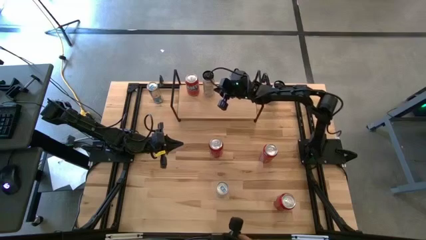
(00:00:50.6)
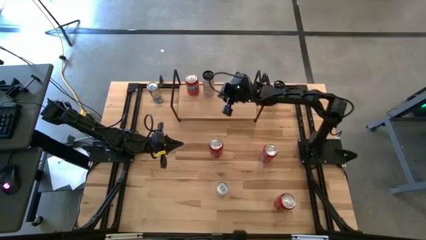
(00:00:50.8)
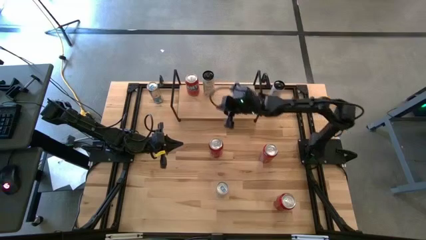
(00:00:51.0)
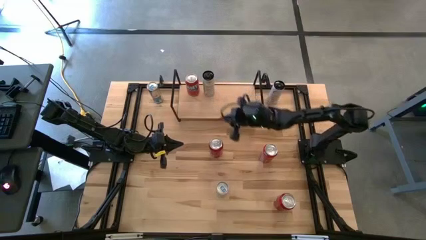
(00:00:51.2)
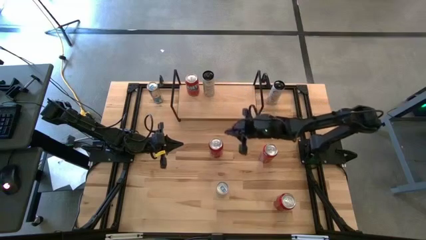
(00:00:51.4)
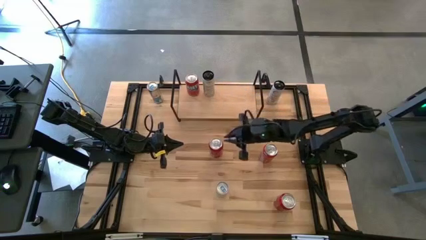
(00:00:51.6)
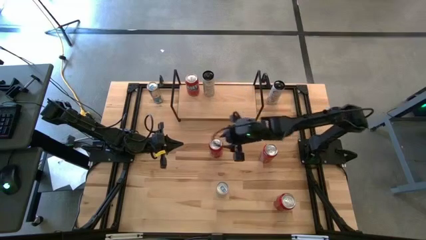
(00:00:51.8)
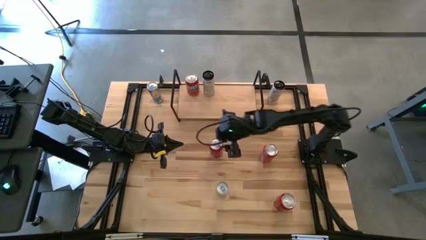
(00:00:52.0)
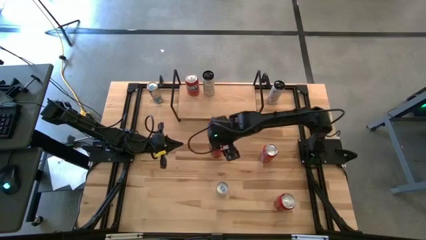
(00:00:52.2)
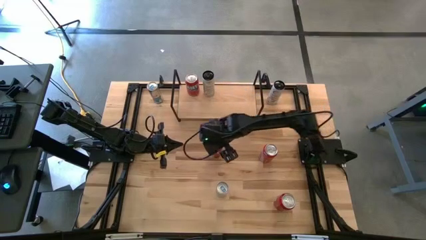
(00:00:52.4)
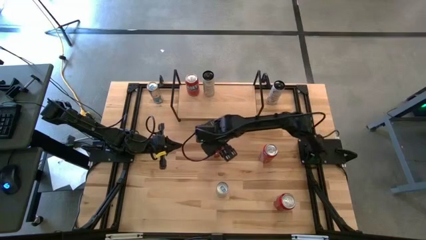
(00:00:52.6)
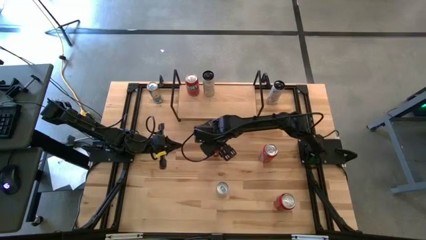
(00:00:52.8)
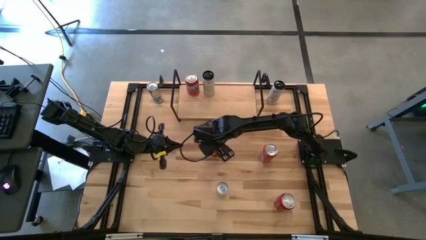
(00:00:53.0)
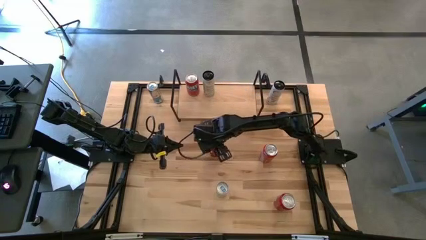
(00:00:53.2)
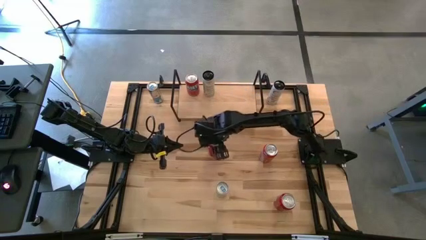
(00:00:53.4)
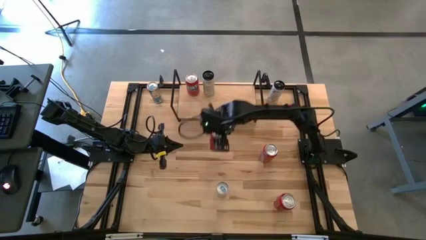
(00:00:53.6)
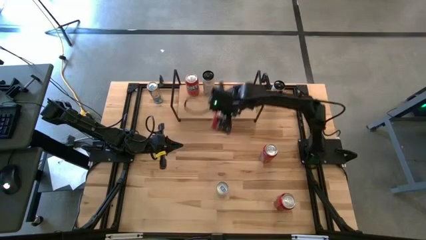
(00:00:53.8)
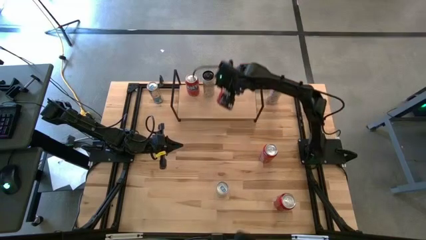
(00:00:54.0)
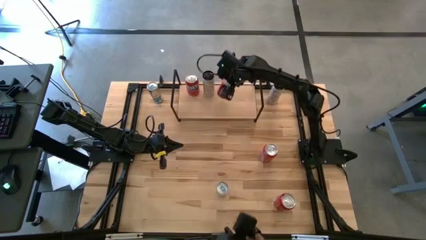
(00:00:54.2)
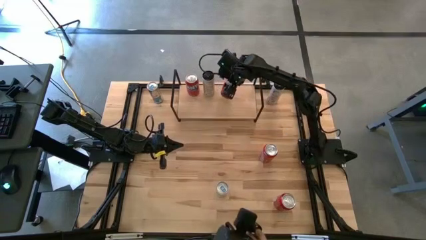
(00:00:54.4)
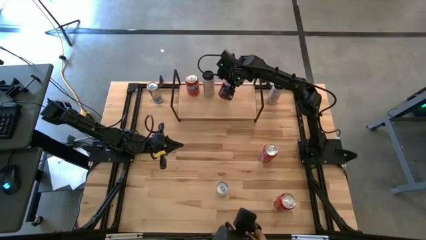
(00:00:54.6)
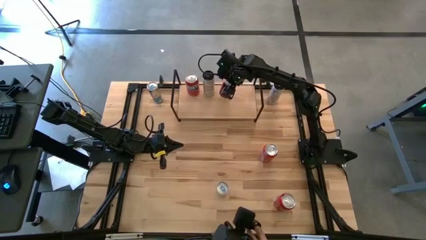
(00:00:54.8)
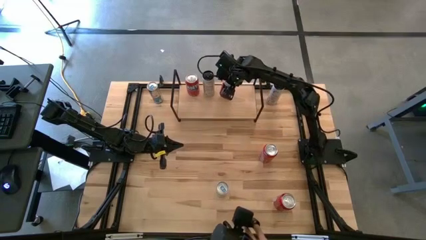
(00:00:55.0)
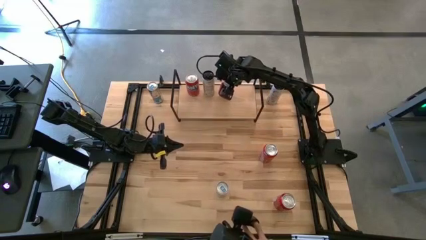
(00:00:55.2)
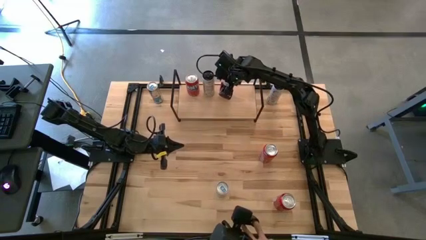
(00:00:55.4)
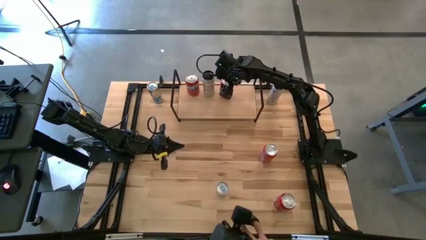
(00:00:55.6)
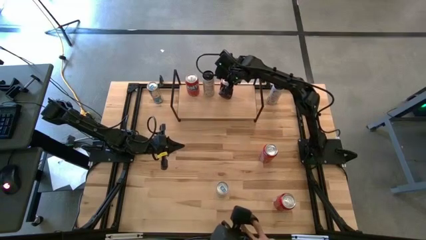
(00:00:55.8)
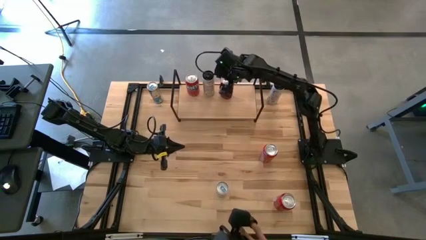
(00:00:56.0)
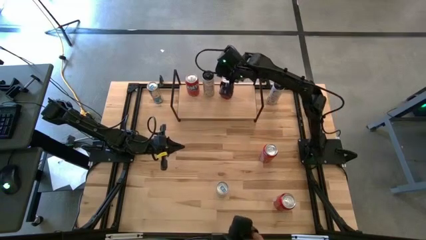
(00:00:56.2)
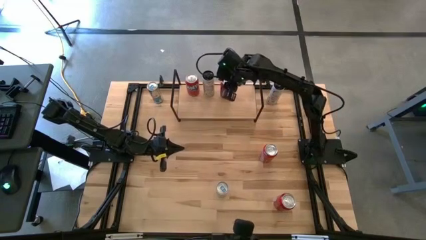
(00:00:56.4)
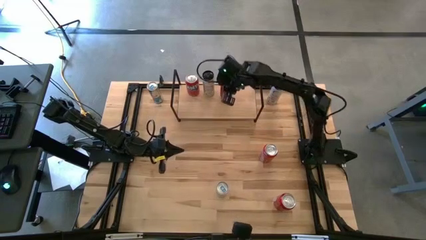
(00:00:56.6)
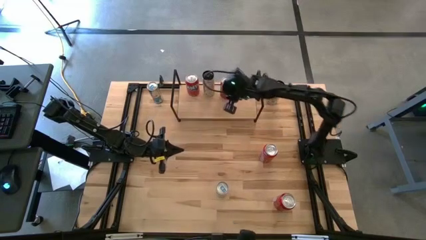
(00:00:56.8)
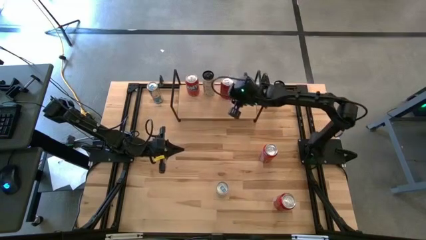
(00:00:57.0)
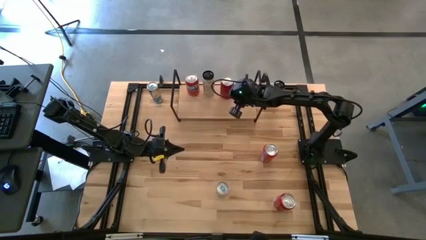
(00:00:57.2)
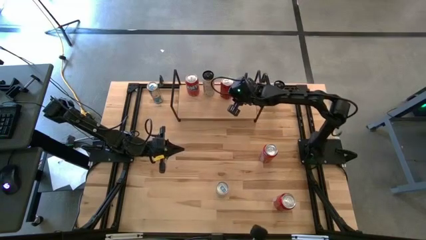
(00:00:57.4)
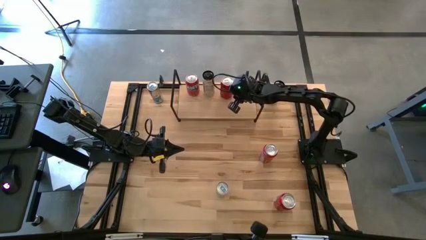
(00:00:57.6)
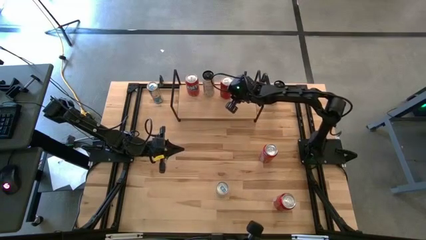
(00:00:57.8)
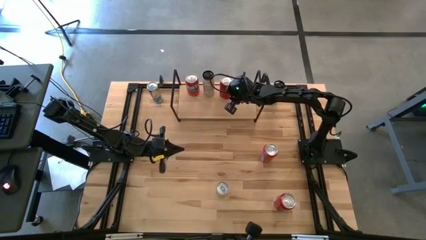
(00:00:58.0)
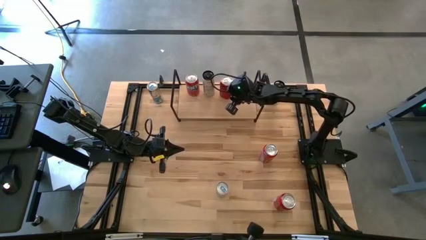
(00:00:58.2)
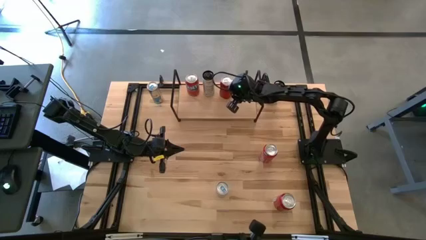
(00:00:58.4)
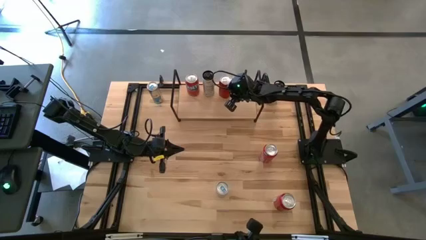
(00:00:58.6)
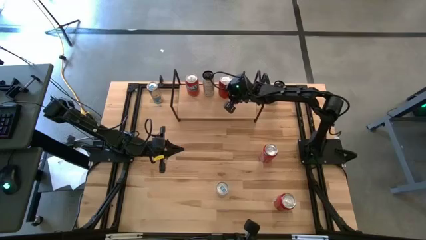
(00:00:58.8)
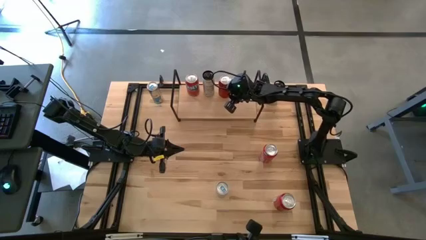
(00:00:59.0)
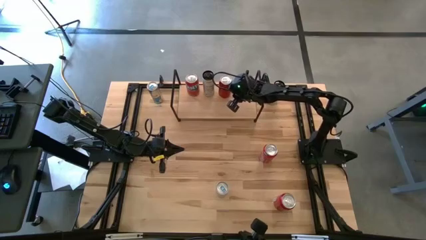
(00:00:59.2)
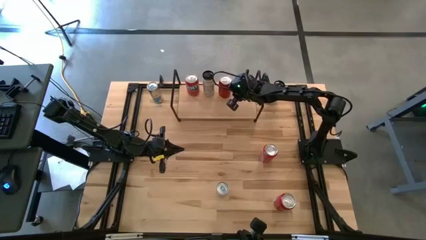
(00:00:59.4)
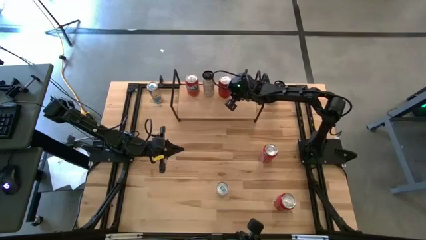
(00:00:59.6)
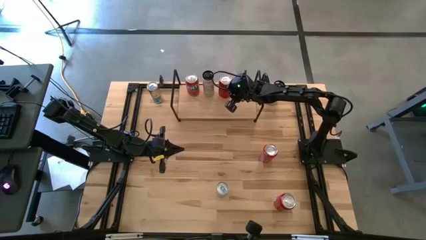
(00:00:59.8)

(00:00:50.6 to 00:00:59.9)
Task: Place canned beverage on shelf
Put the top red black soda can on the shelf

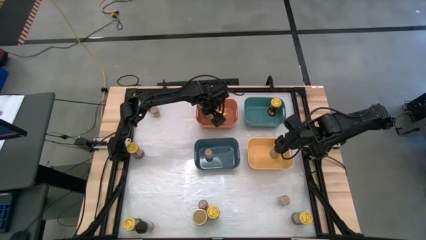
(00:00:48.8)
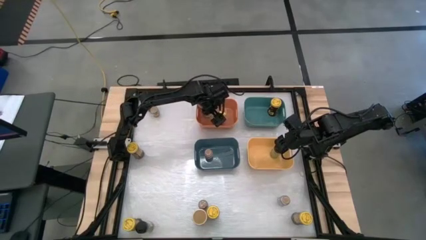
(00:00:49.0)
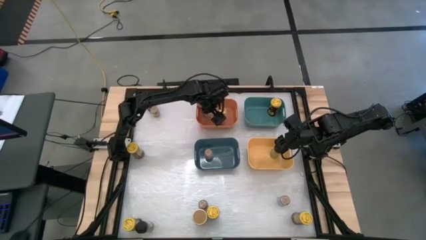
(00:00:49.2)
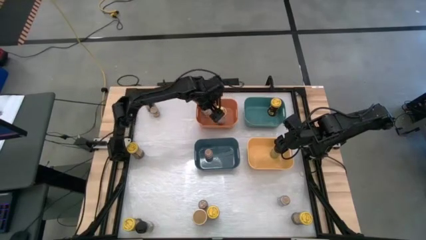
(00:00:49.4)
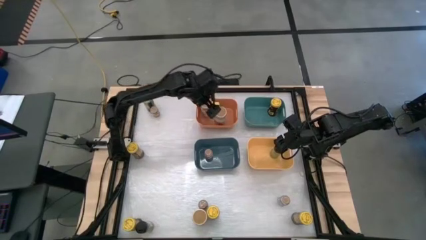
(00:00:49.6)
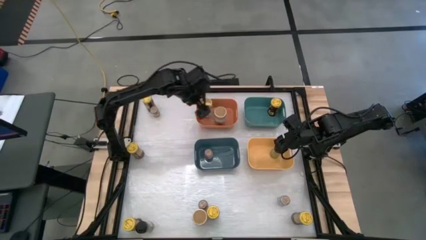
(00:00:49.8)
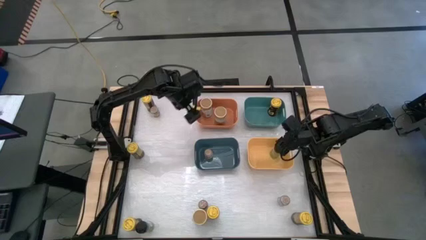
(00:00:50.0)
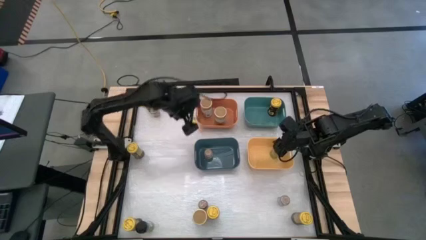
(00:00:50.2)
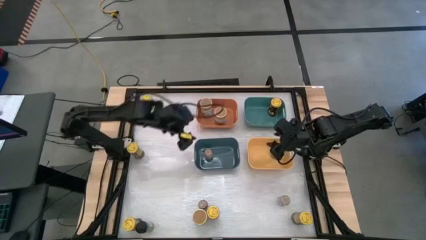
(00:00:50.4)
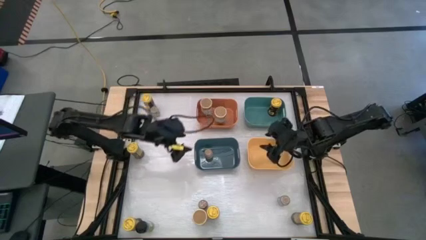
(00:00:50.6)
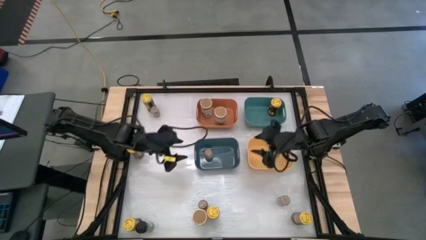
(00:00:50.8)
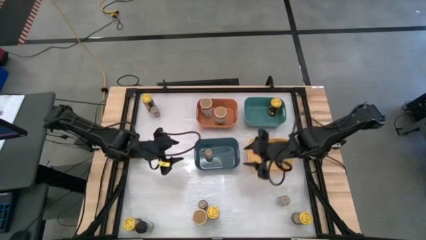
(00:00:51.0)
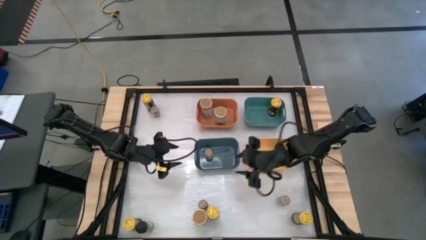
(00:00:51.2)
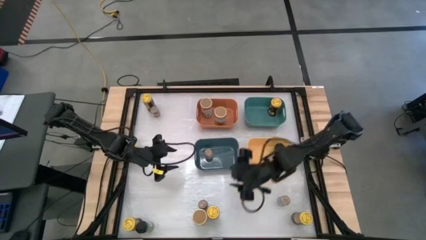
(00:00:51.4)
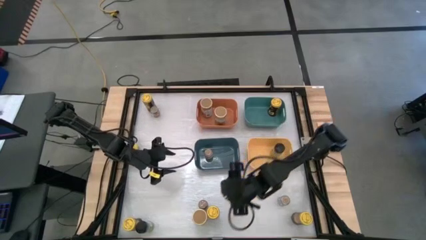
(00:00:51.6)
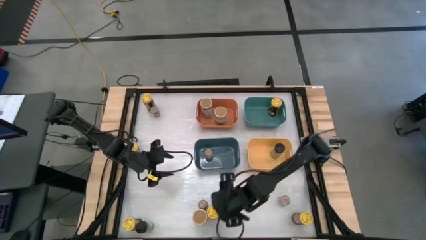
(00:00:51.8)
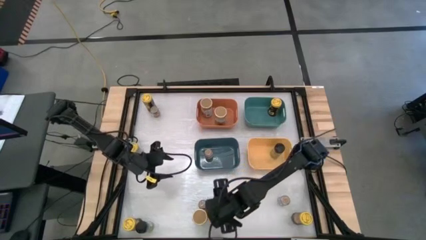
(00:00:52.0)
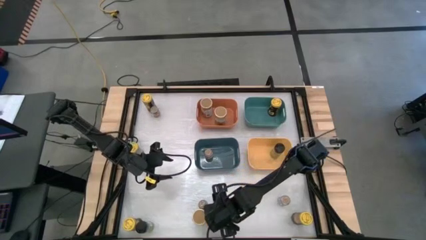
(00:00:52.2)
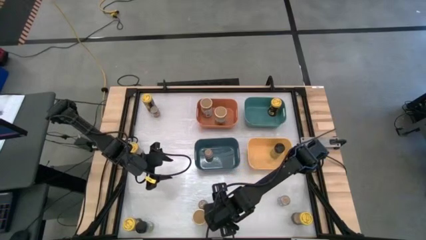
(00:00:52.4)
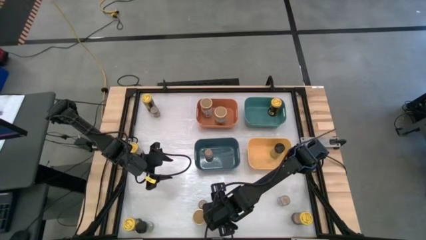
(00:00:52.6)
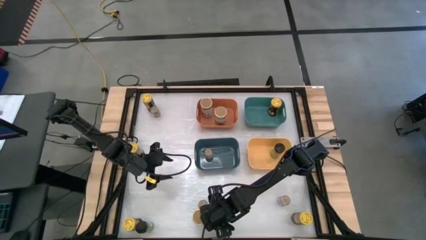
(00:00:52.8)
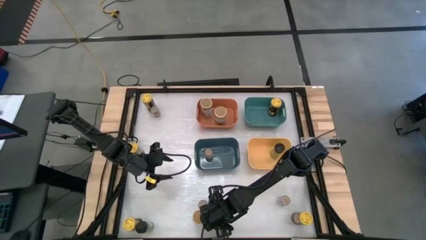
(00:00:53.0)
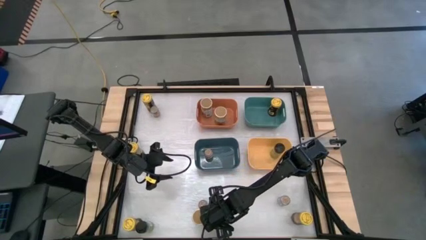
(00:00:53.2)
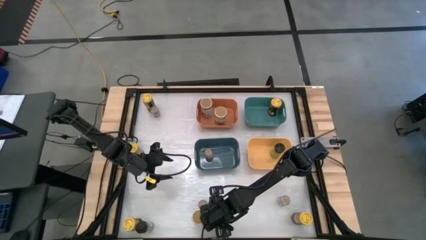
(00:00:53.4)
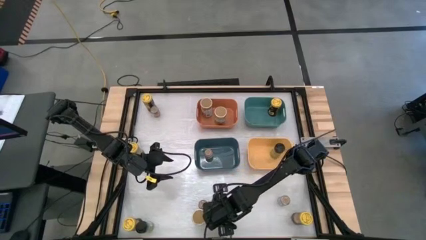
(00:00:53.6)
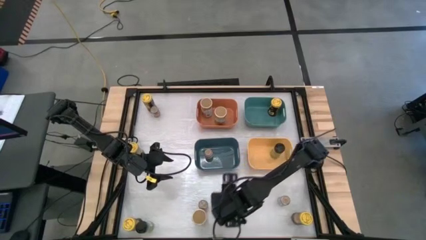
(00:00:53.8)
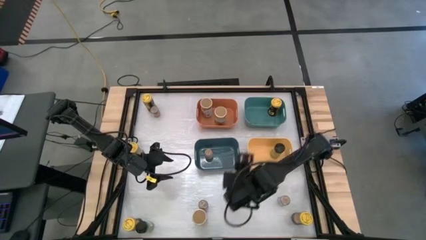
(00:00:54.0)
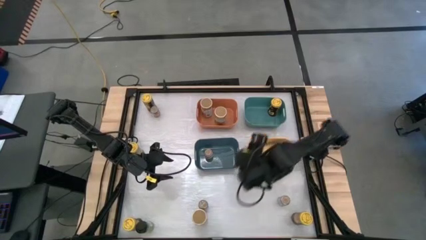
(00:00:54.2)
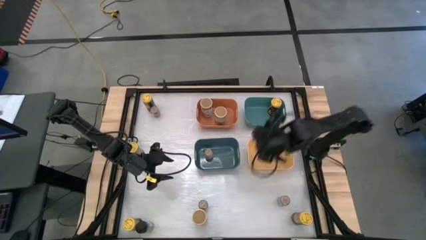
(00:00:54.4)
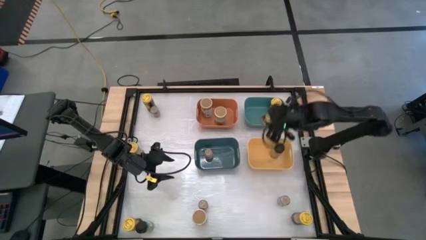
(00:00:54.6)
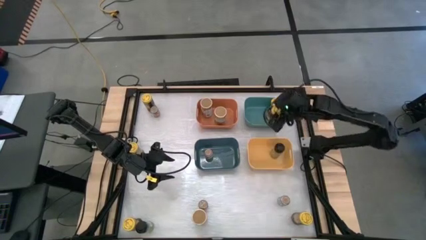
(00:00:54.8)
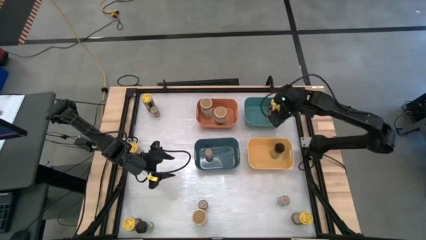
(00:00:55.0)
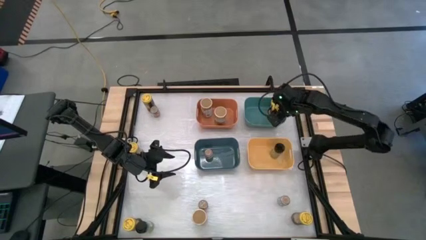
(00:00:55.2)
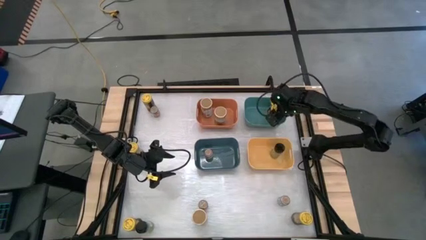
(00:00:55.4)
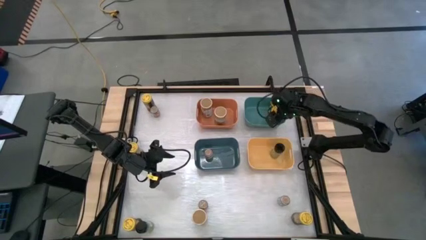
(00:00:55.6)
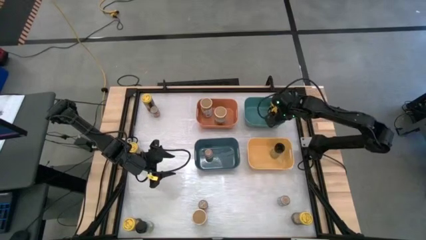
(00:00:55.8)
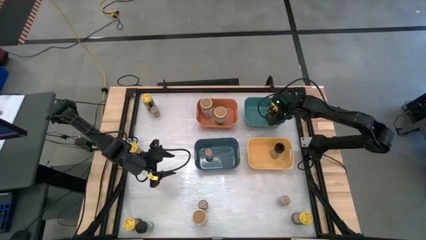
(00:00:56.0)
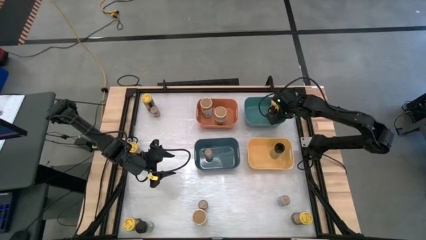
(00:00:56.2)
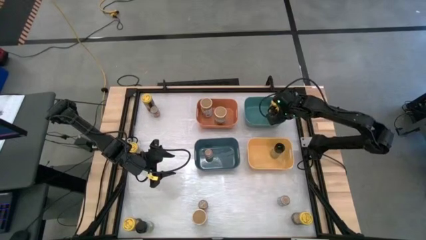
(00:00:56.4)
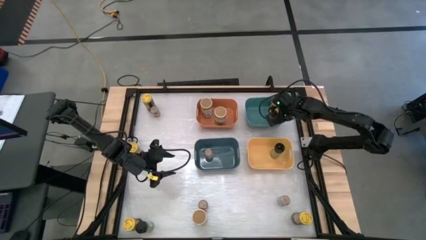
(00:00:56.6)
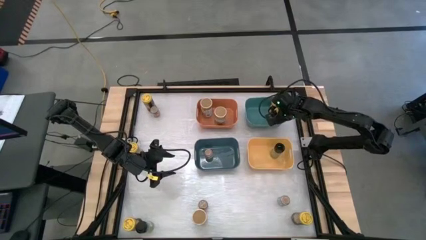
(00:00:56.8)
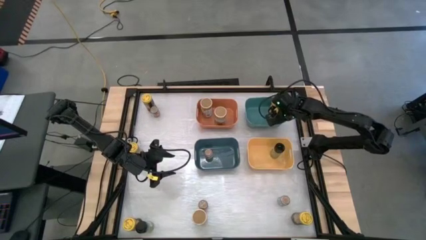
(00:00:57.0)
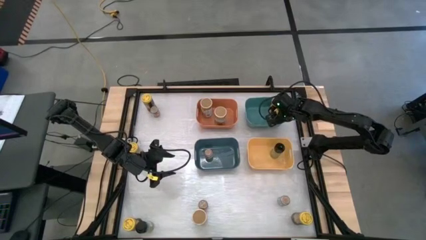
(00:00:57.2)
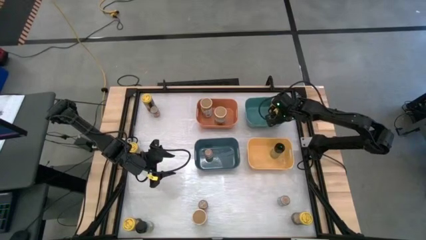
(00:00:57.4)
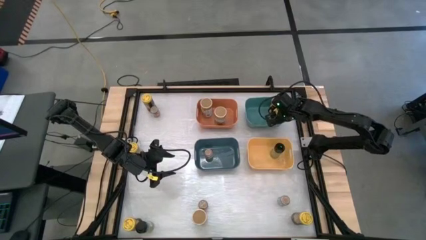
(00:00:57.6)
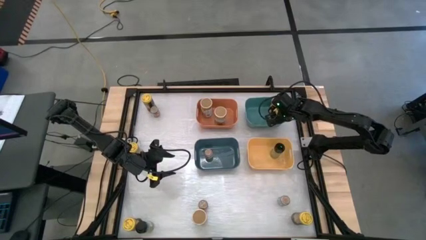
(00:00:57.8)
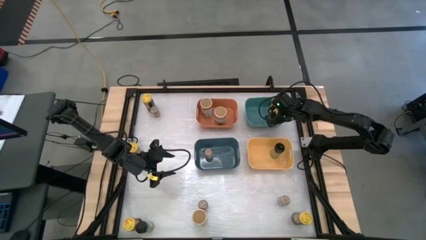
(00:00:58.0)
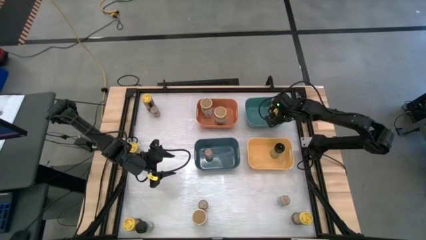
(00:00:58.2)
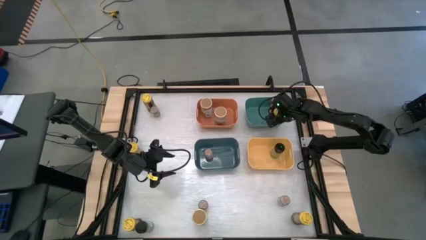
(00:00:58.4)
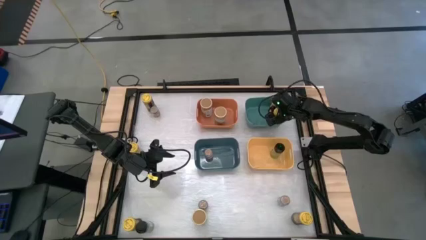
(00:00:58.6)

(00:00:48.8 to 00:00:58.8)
Task: Sort spices by type
Put the yellow spice bottle into the green bin
